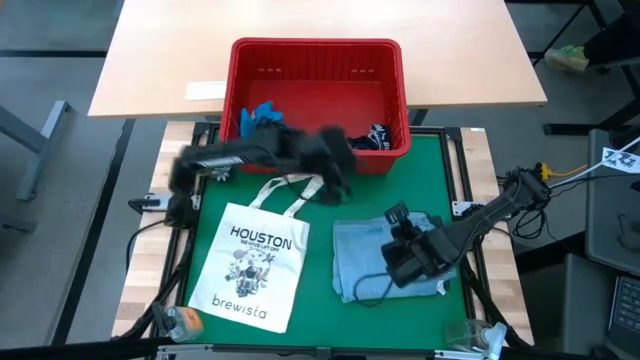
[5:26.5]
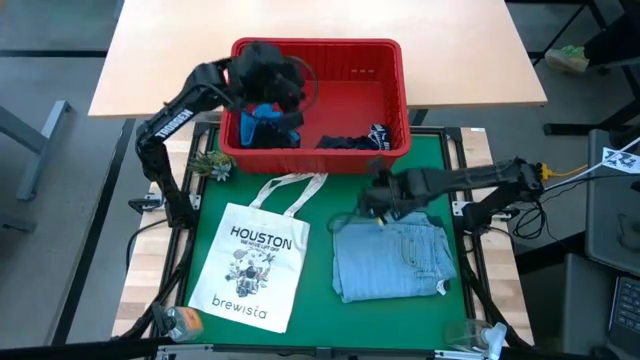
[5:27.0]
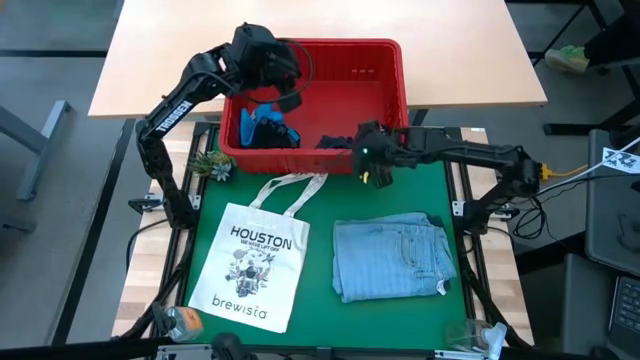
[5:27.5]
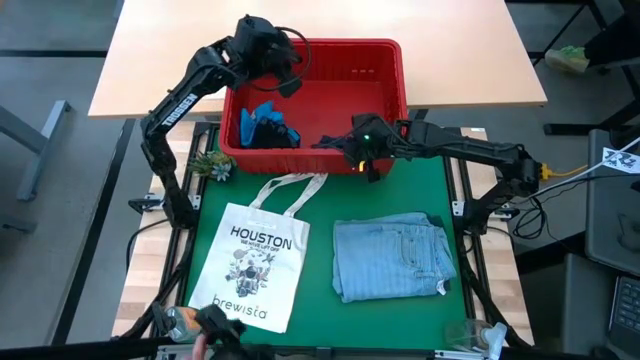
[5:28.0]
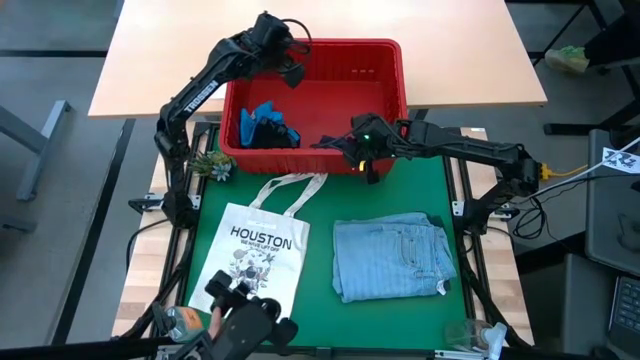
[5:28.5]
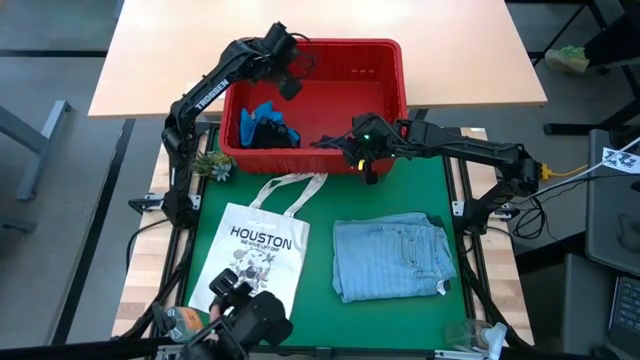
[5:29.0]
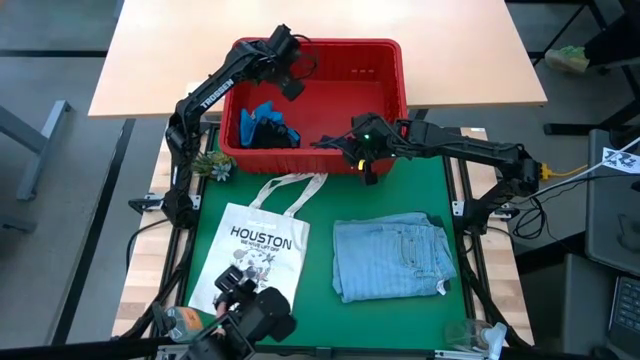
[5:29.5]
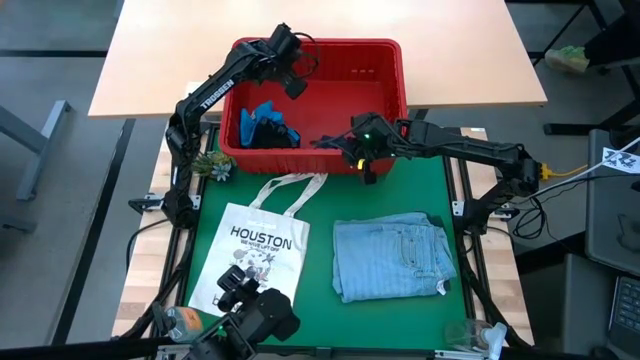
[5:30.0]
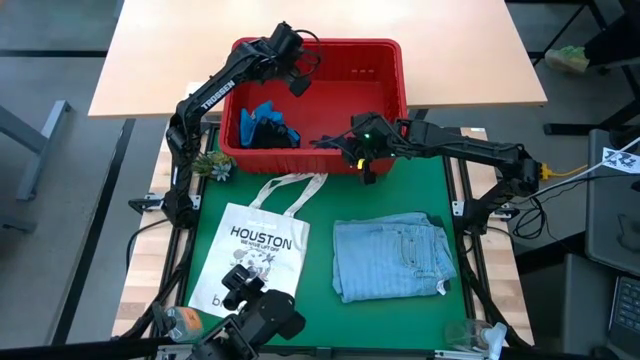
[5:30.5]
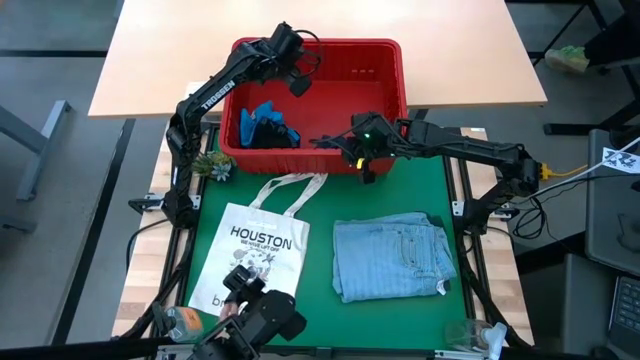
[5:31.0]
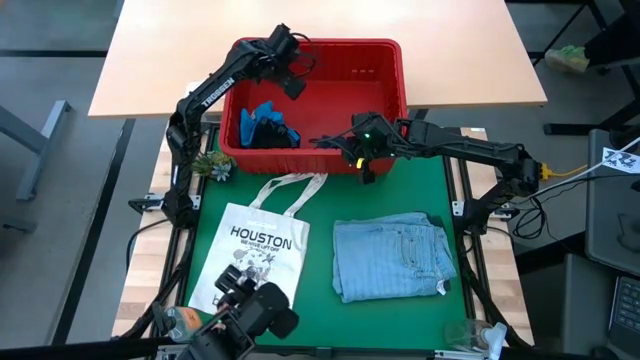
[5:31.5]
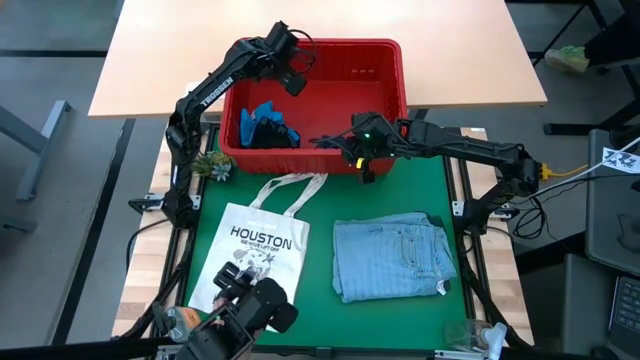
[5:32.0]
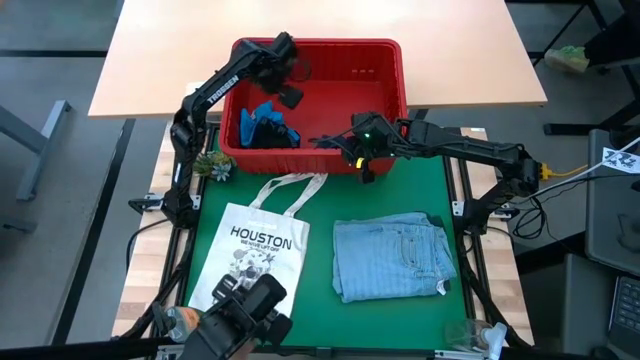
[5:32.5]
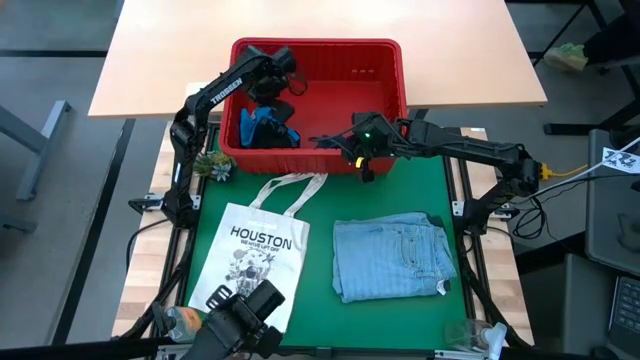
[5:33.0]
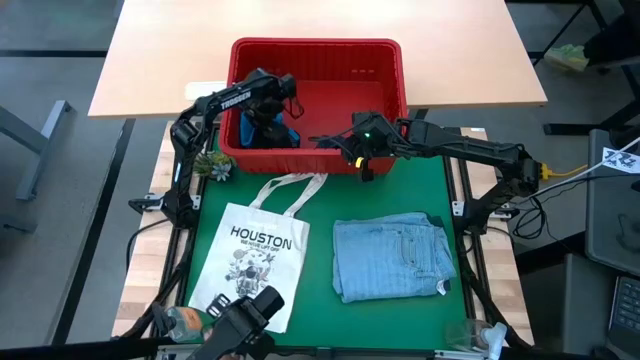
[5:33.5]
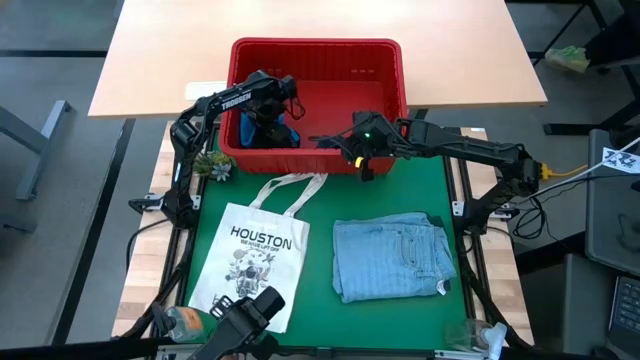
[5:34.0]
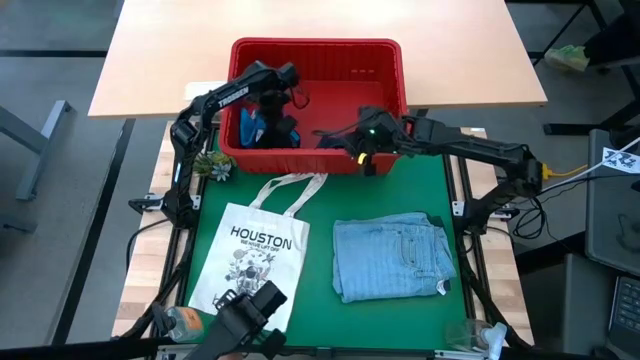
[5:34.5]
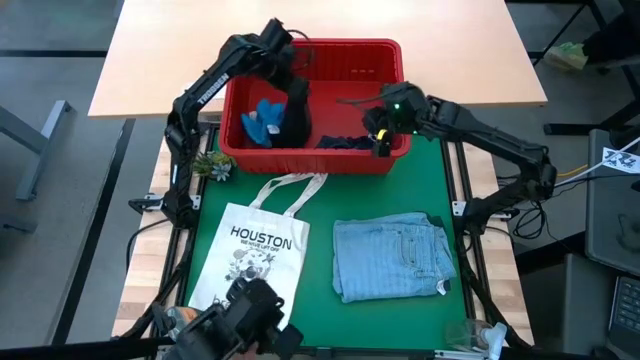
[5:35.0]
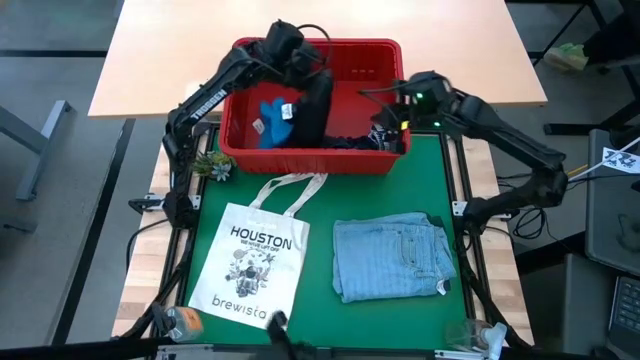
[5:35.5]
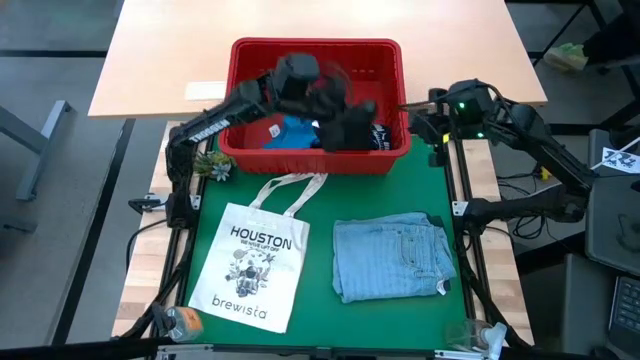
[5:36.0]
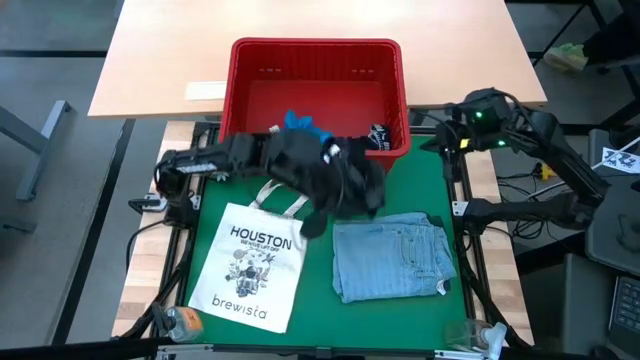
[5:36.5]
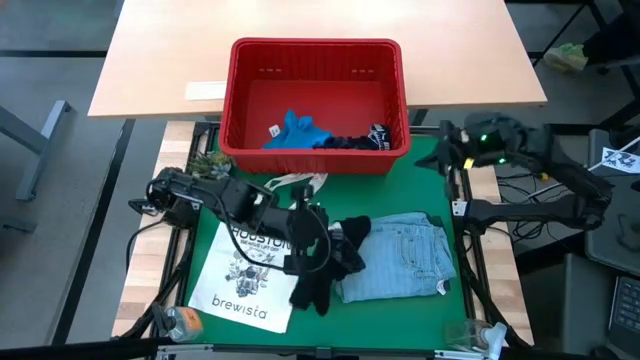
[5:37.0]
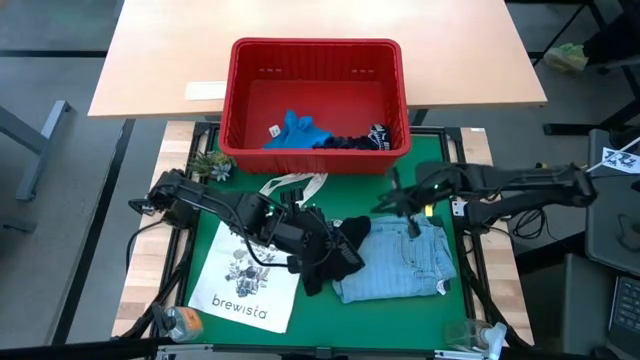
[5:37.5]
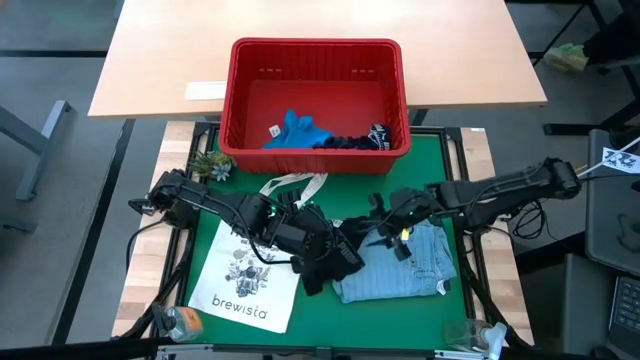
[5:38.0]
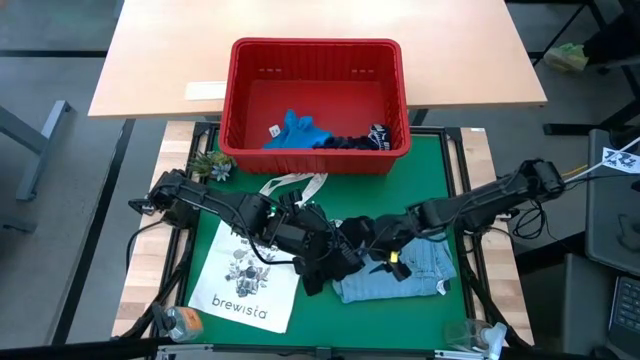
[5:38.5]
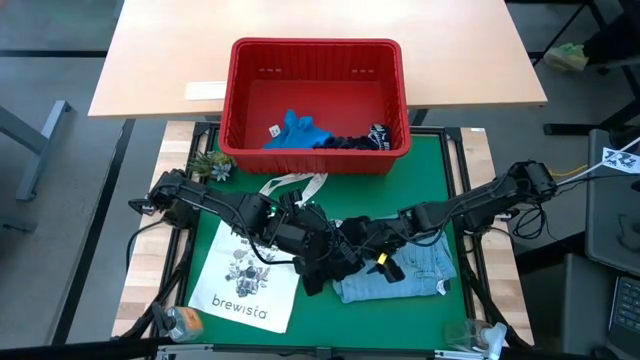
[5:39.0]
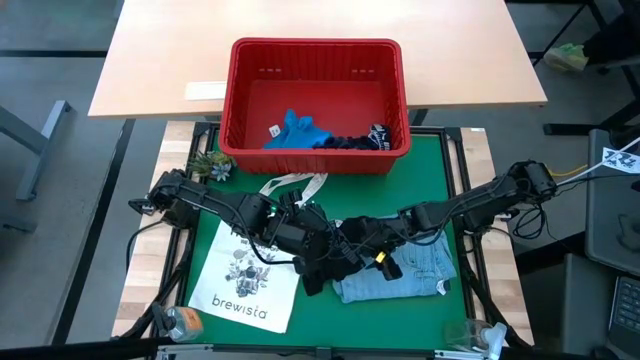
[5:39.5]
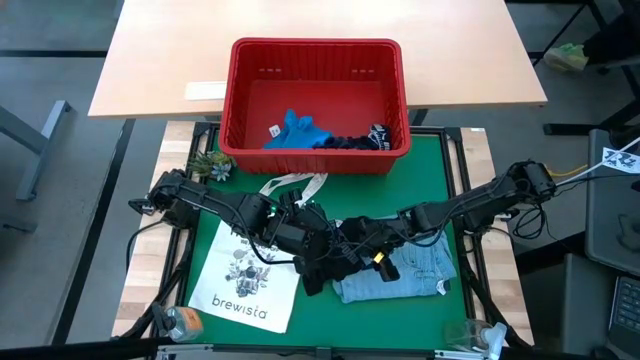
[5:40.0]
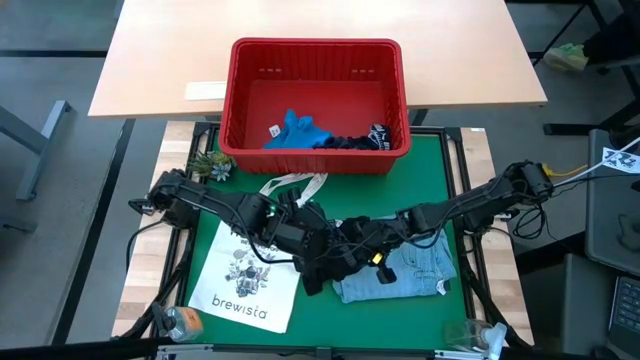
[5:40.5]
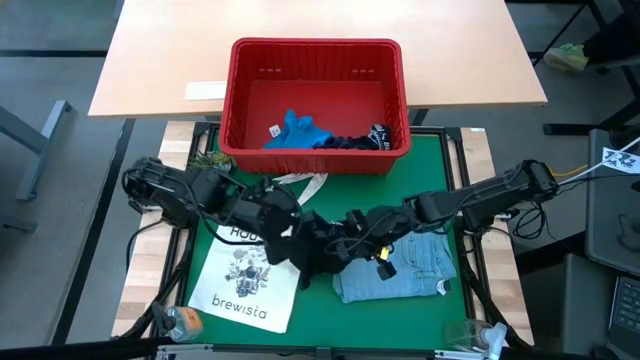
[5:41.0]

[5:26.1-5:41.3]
Task: Fold Laundry from Bin
Fold the black boxer

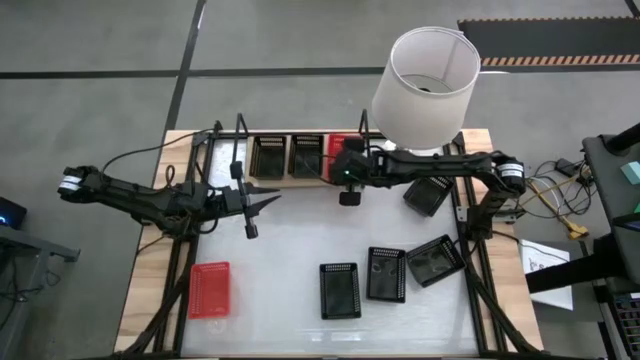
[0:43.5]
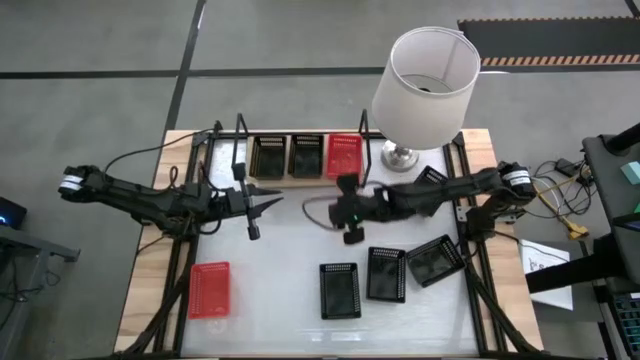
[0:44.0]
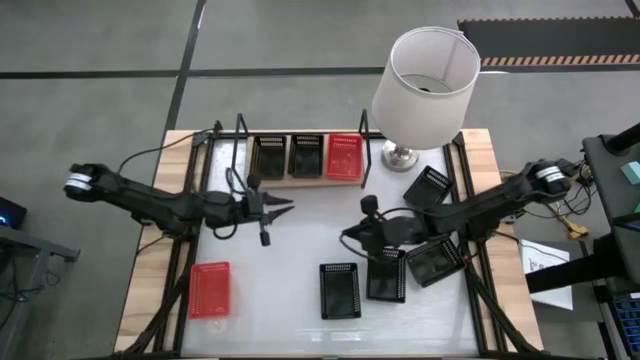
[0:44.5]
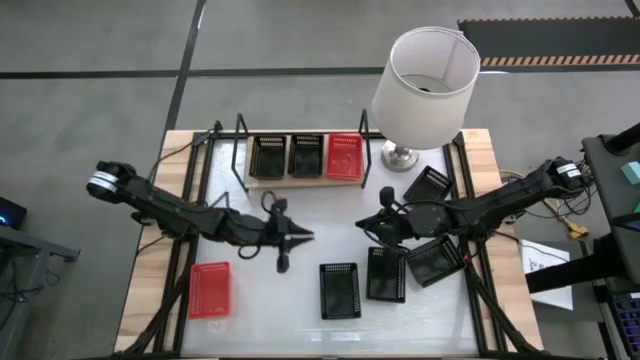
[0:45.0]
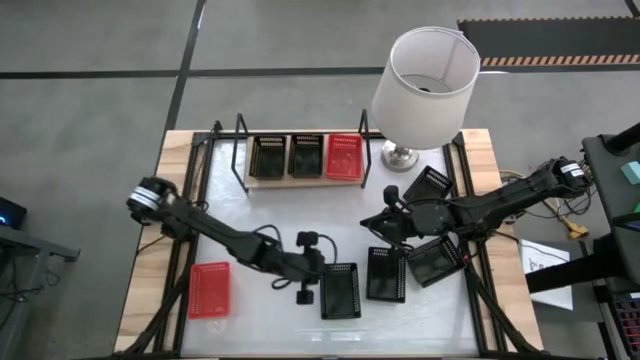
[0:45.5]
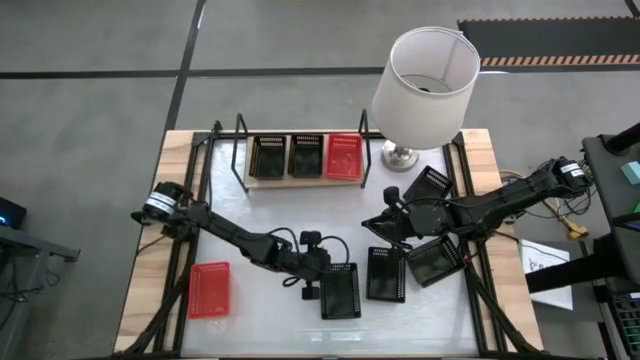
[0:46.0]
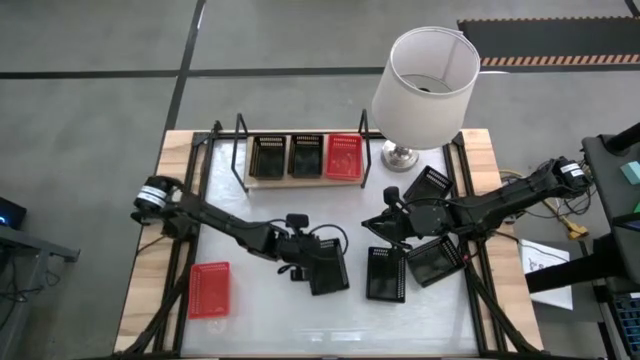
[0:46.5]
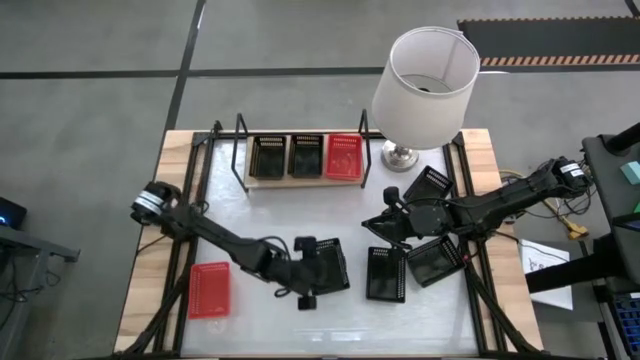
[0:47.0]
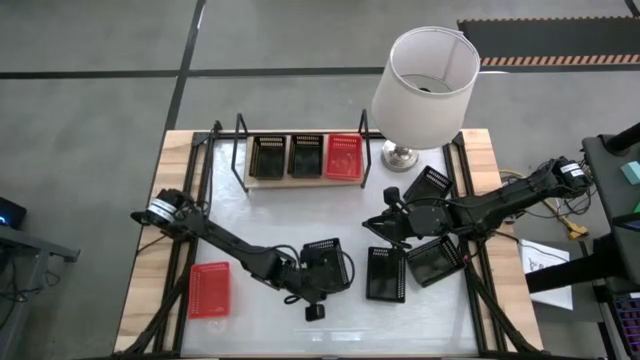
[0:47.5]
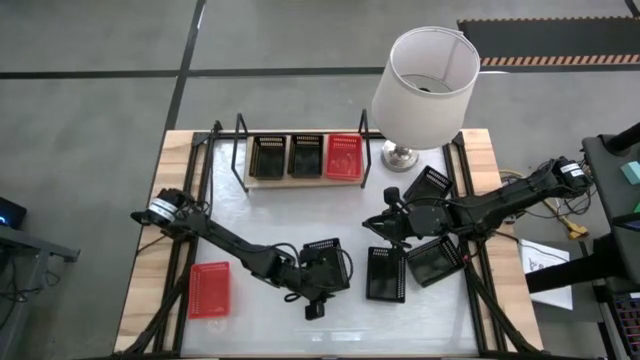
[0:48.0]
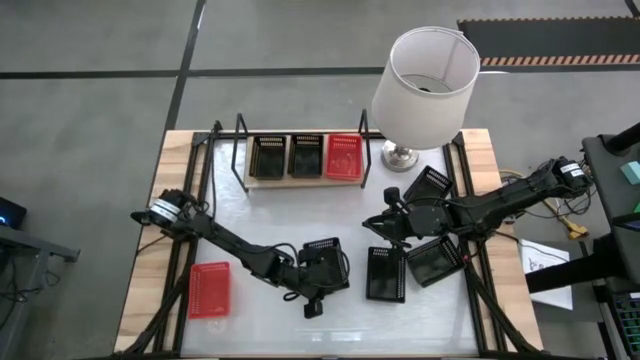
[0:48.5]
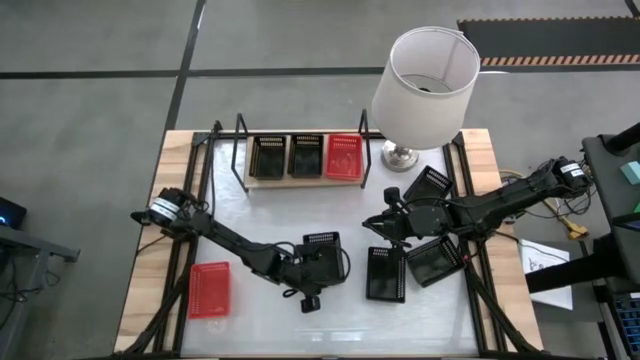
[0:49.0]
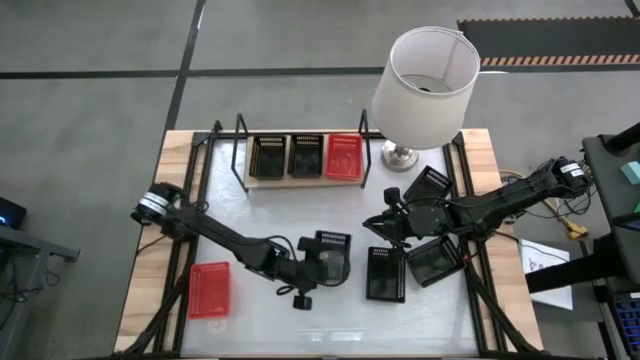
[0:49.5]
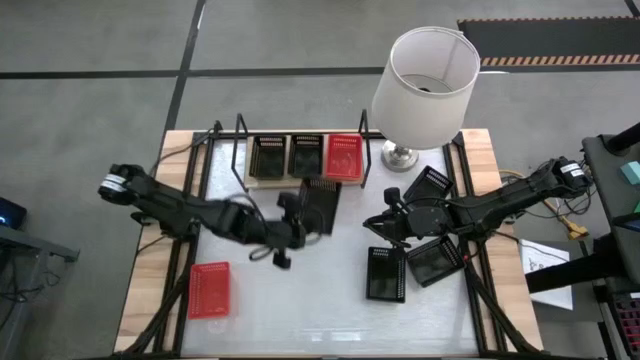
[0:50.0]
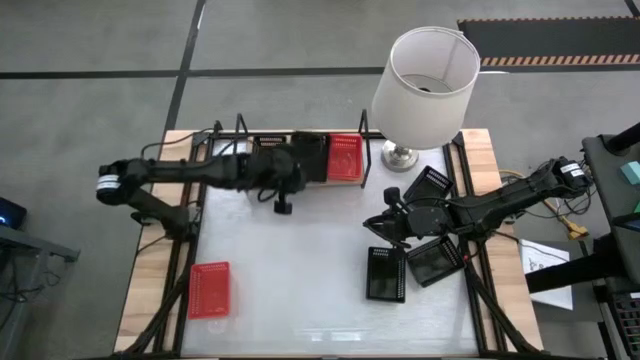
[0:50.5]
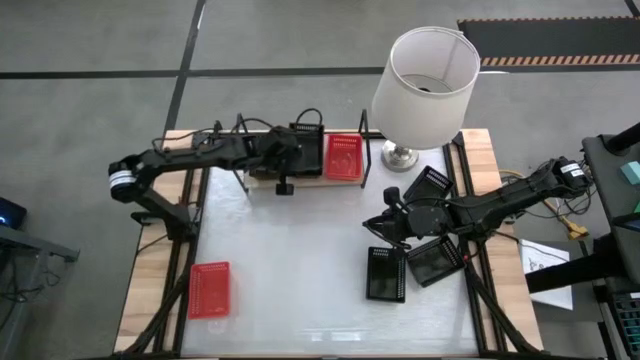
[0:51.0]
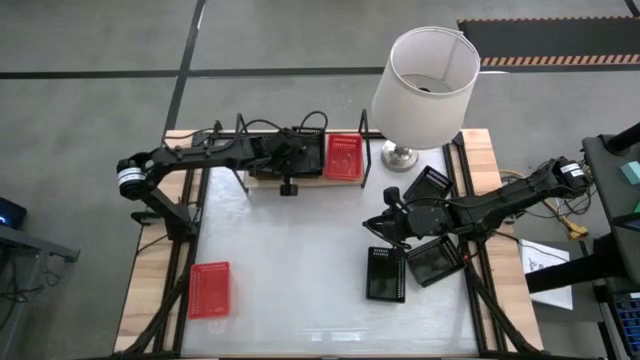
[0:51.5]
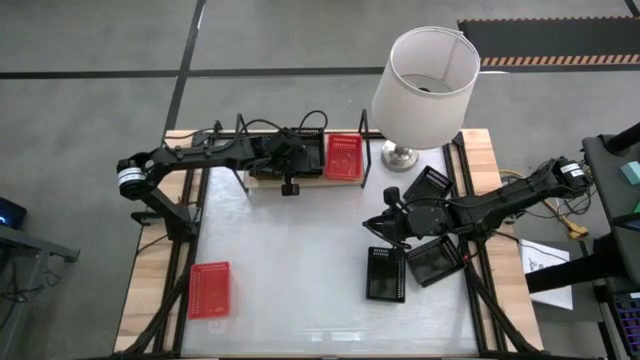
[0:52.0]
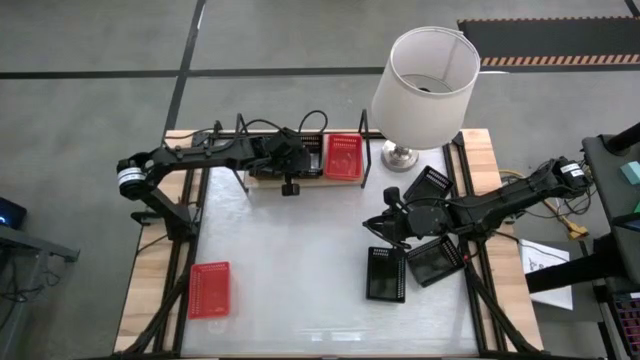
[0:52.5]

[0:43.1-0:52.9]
Task: Stack baskets on shelf by color
Stack the black bin on the right black bin on the shelf
